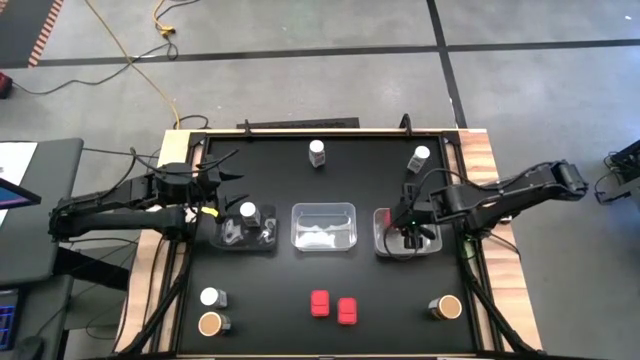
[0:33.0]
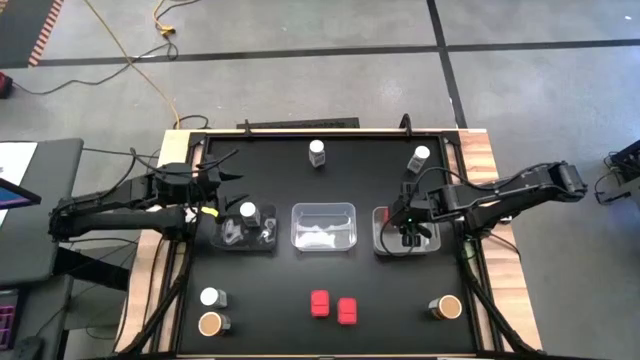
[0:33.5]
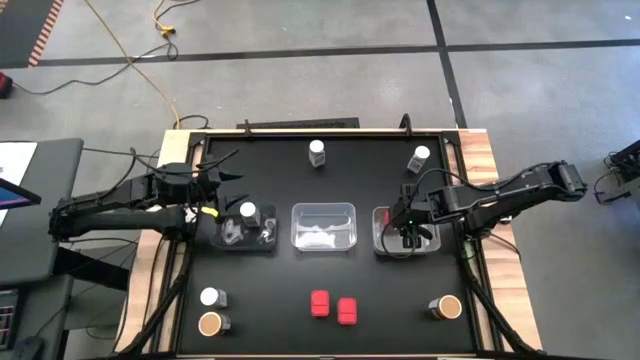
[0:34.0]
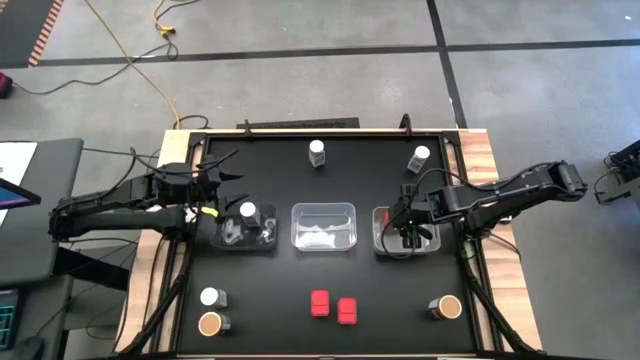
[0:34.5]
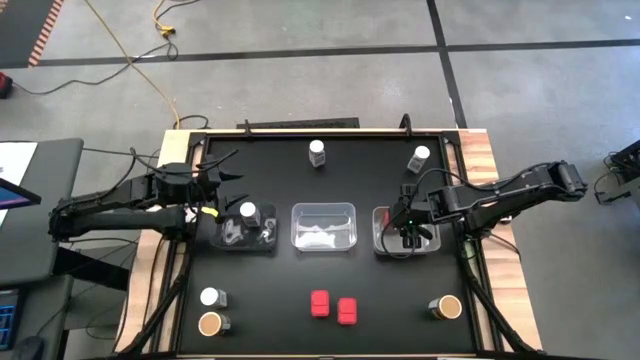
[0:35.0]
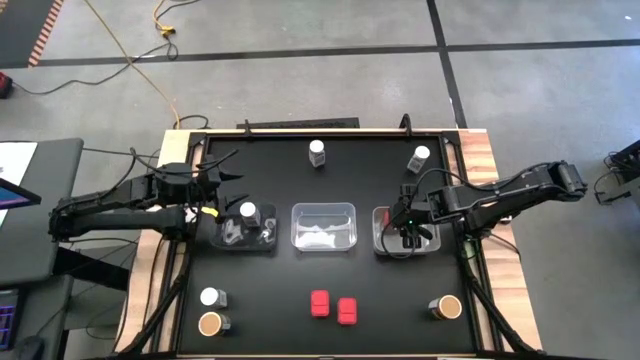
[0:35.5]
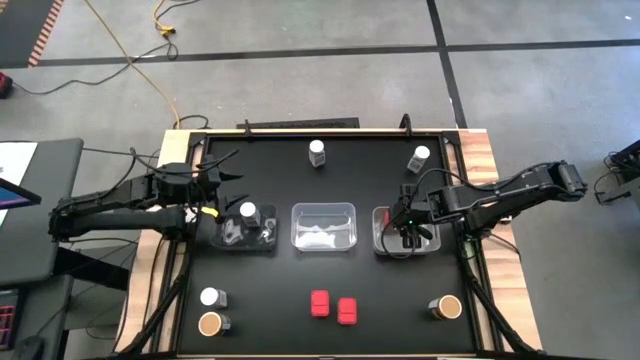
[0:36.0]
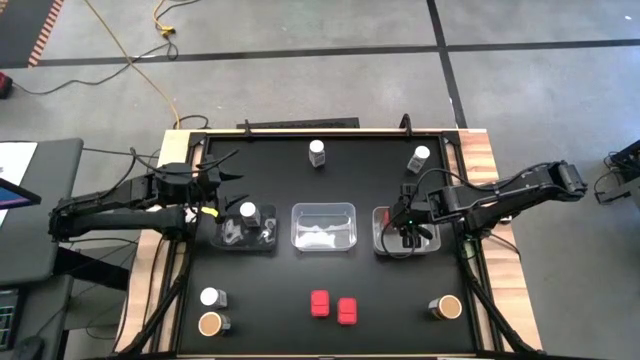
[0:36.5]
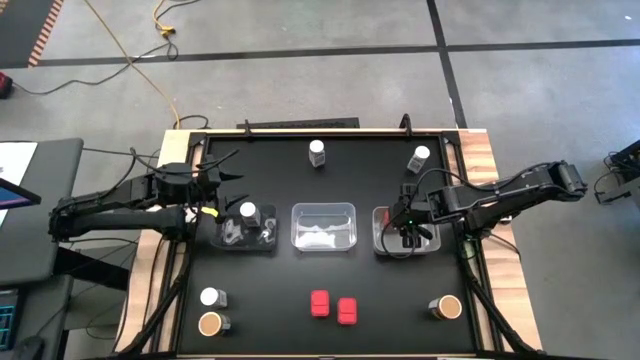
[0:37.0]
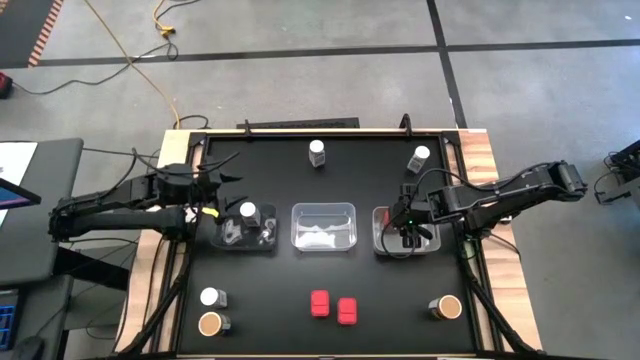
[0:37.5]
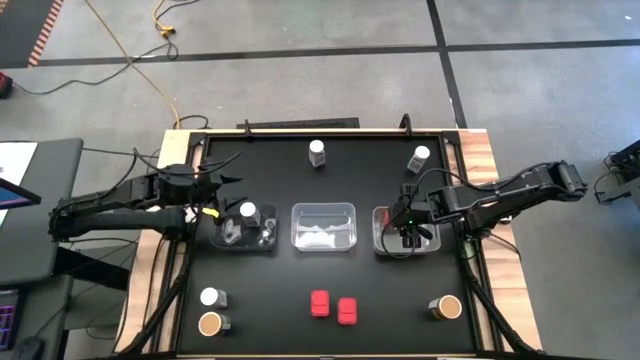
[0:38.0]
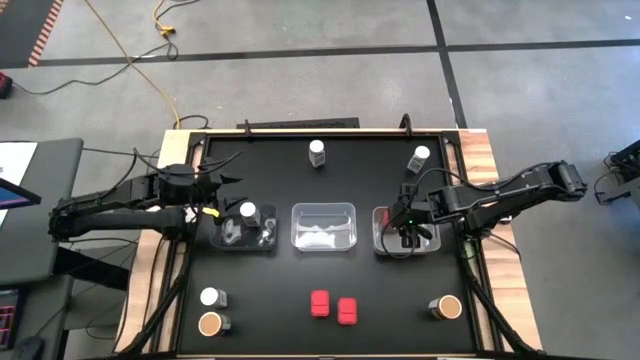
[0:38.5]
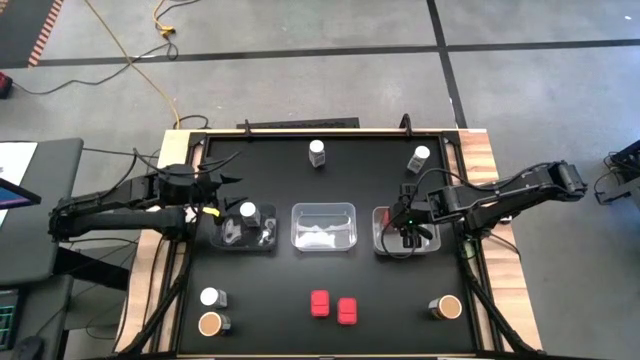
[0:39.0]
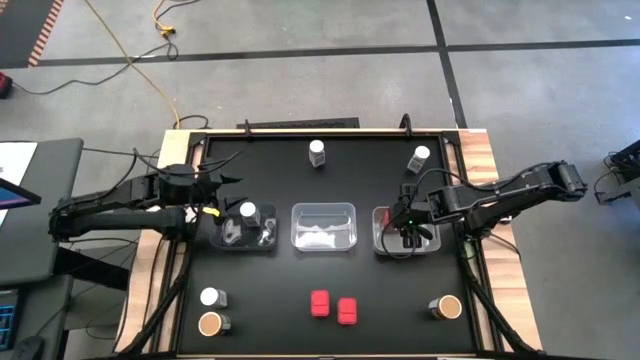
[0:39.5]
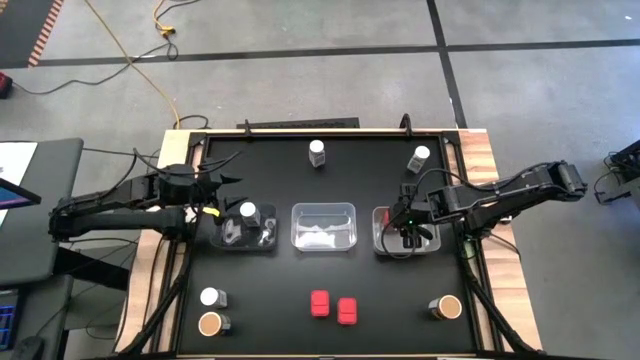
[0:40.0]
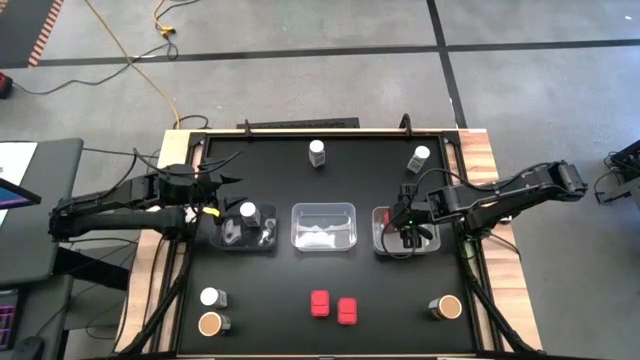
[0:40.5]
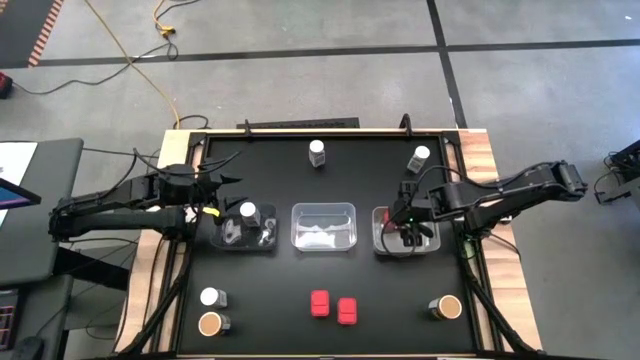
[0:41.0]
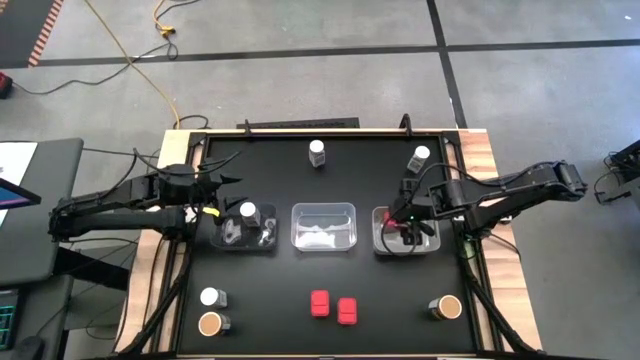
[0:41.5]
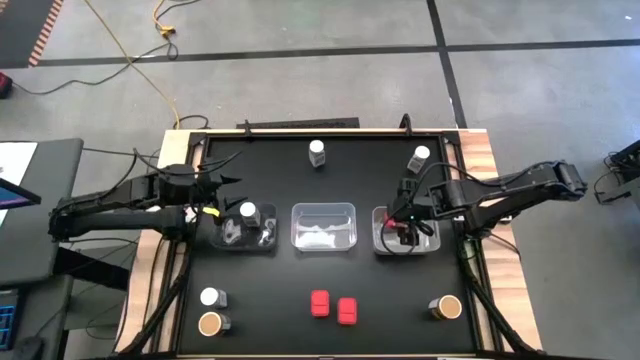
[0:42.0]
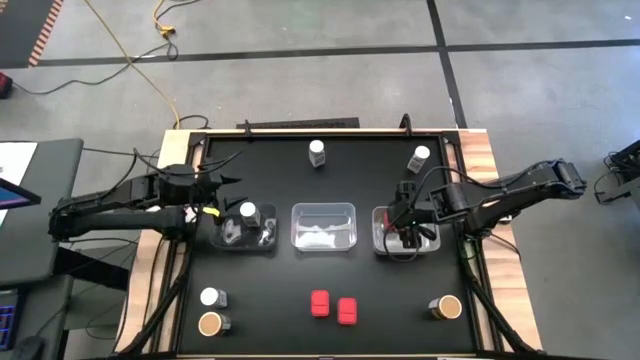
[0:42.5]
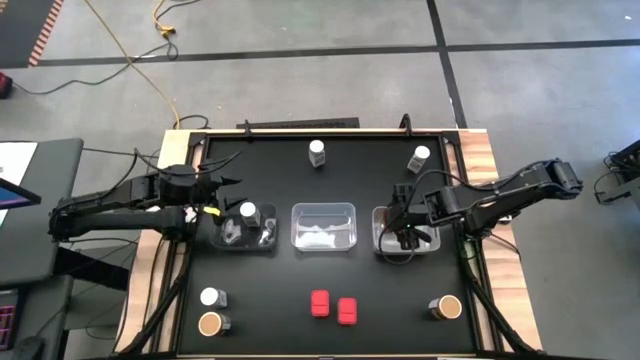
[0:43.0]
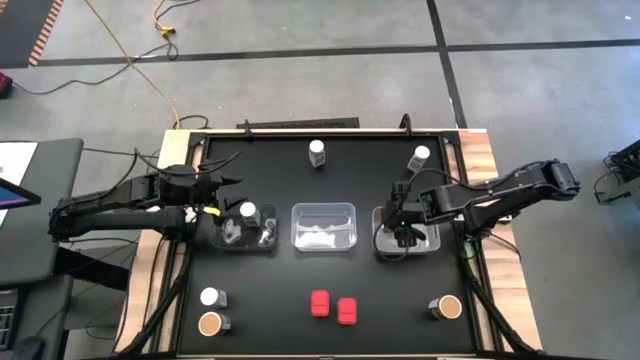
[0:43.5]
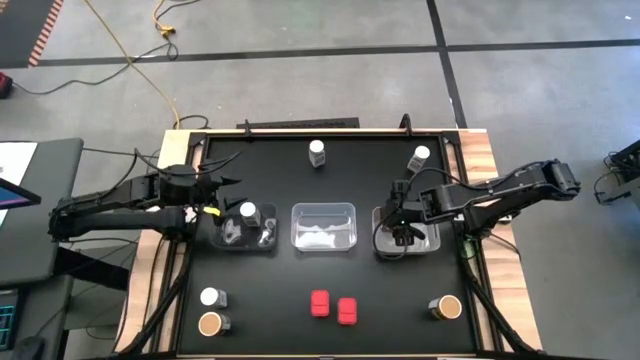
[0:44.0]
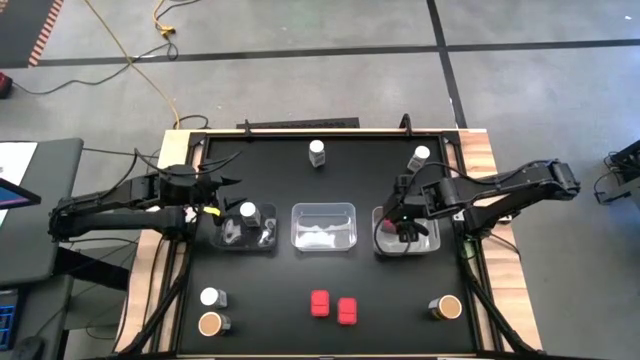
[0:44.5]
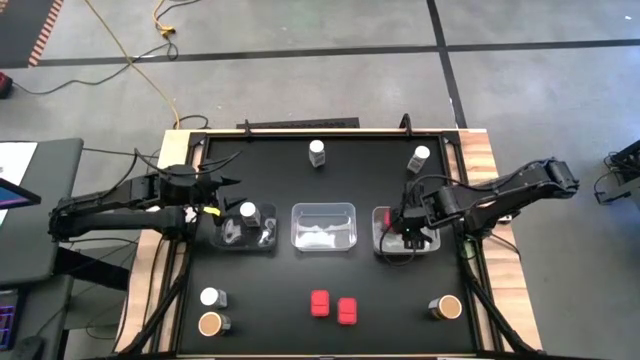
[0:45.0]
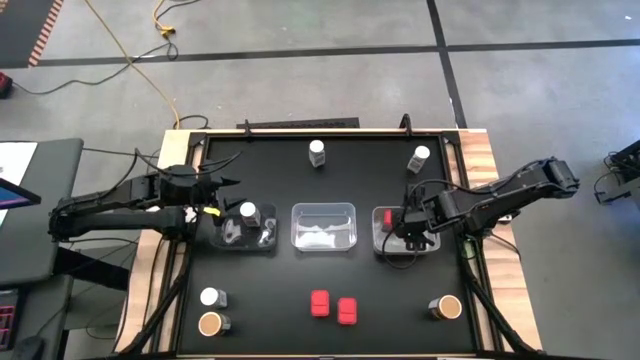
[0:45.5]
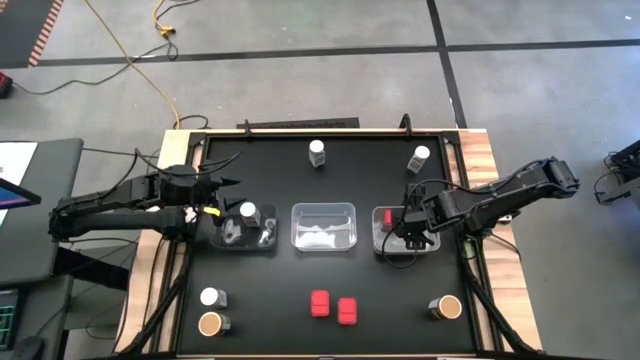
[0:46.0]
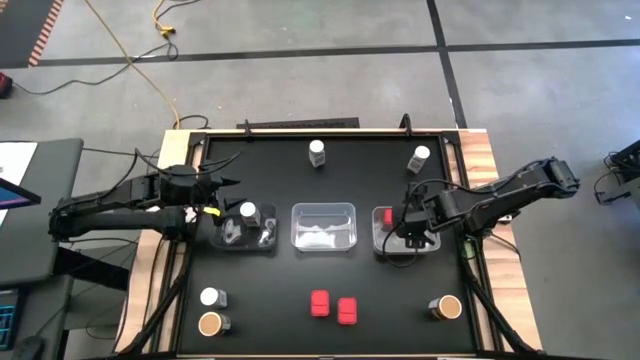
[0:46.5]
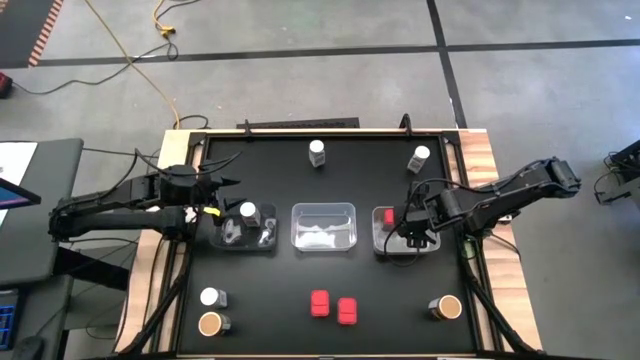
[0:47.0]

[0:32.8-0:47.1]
Task: Sort spices by type
Put the top red seasoning can into the white bin

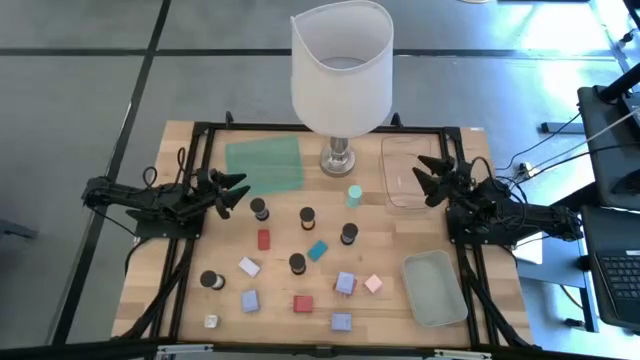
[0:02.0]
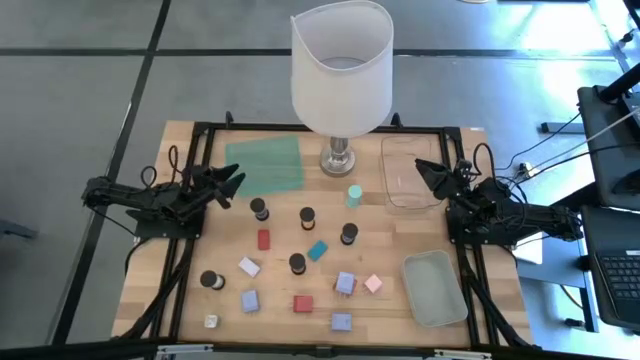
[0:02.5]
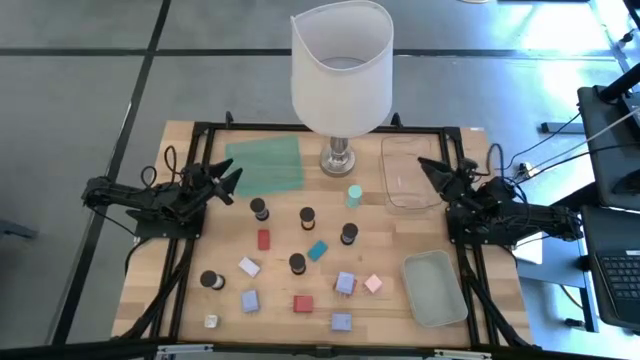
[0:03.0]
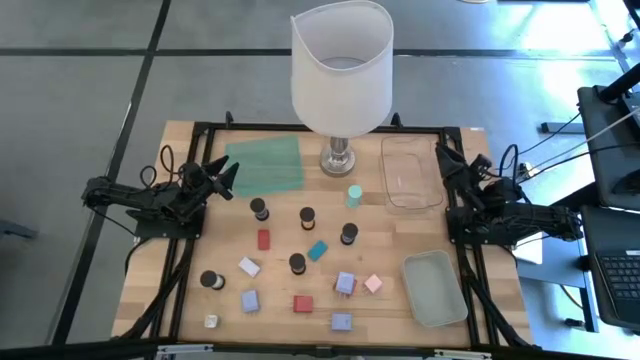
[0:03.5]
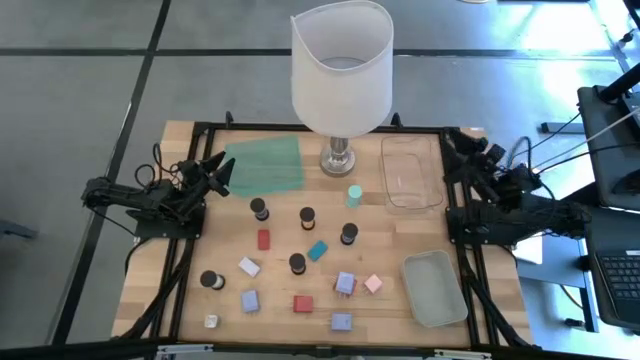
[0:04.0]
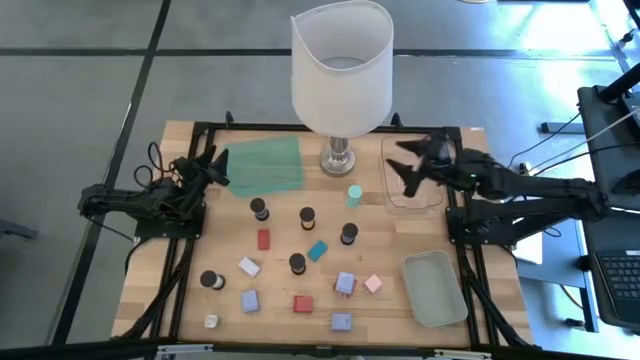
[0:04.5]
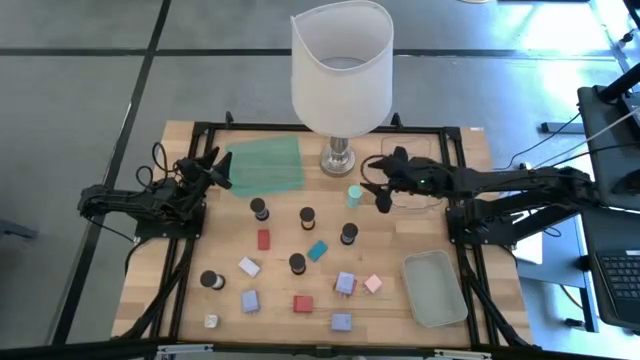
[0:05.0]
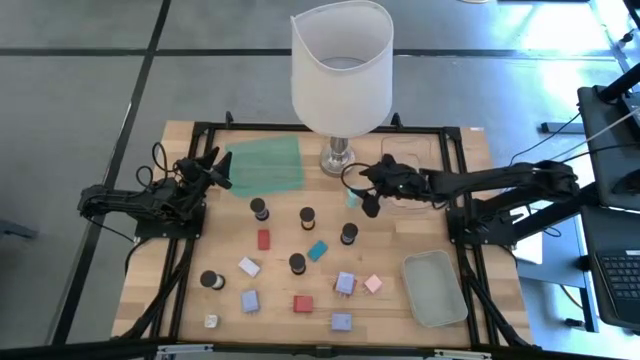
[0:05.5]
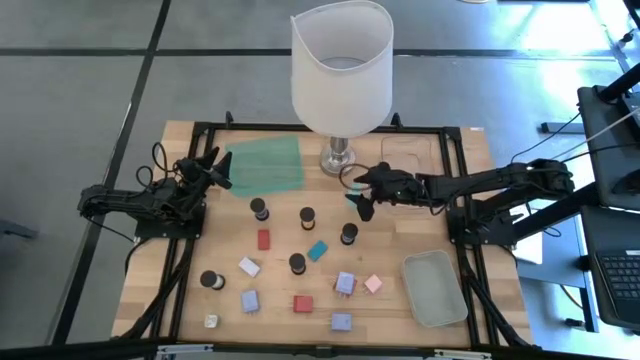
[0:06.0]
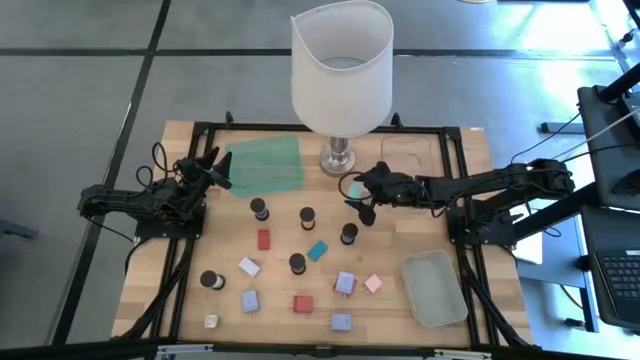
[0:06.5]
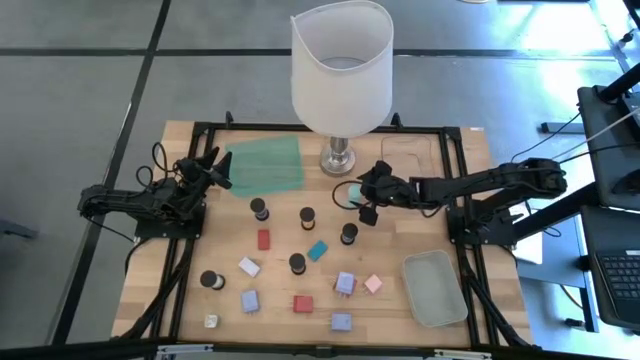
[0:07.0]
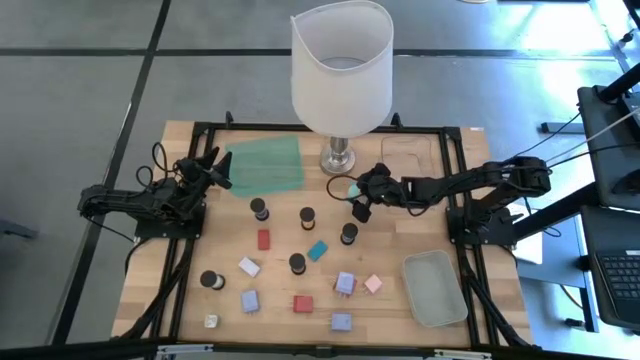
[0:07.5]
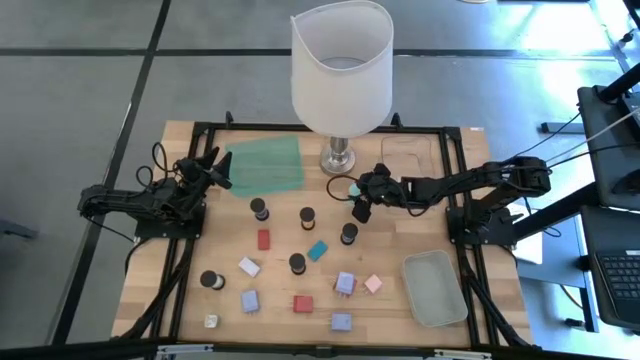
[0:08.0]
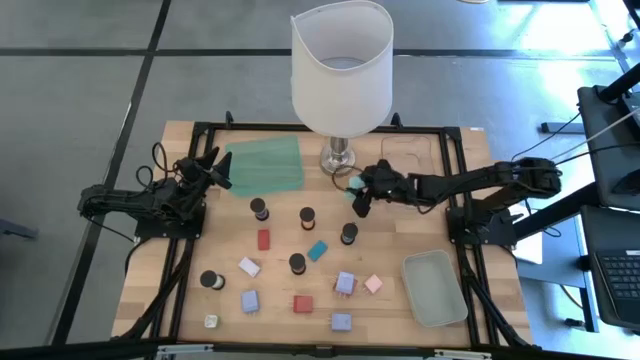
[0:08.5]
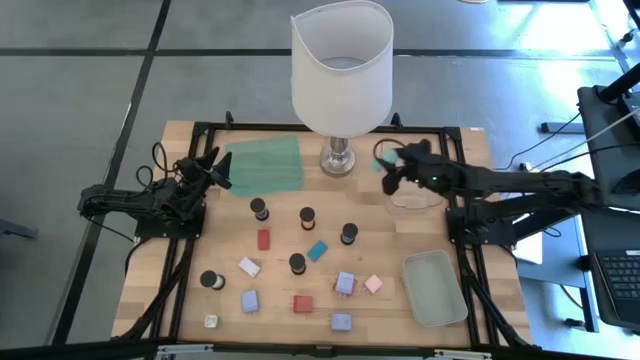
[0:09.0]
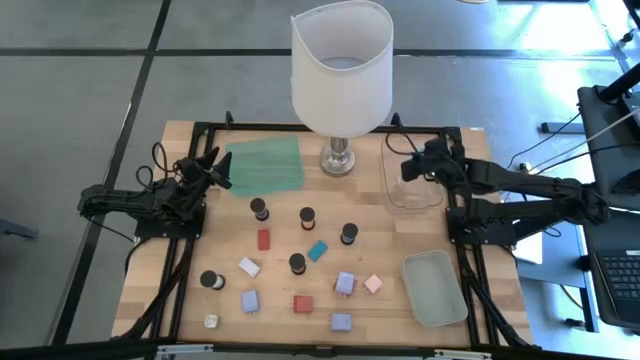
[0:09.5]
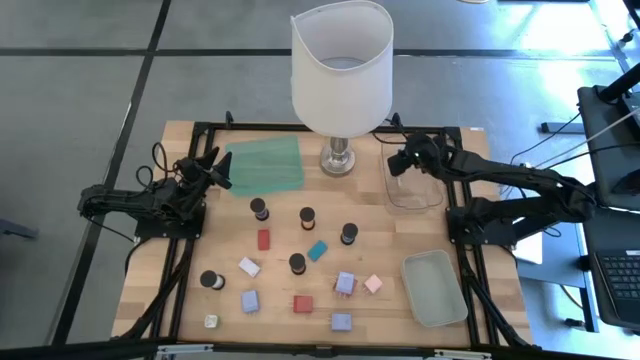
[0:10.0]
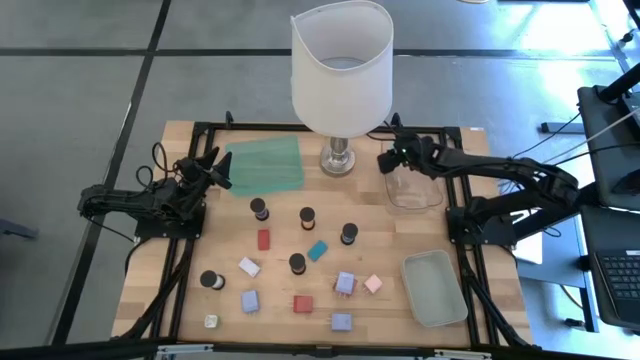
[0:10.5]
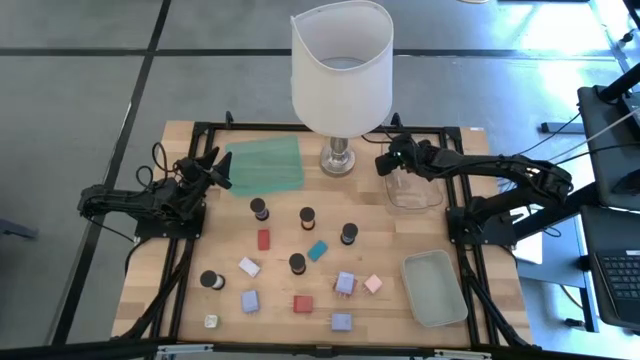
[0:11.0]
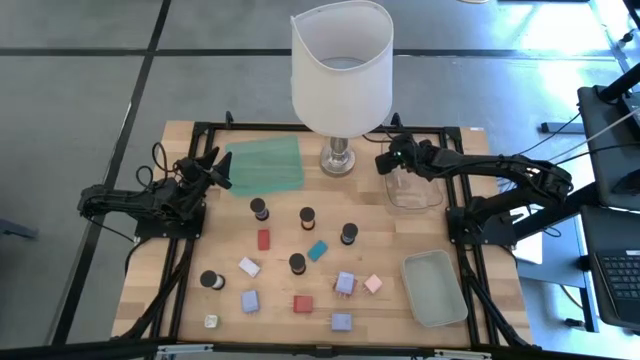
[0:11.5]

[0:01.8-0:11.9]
Task: Pick & Place Office items
Put the light blue hourglass into the transparent bin
